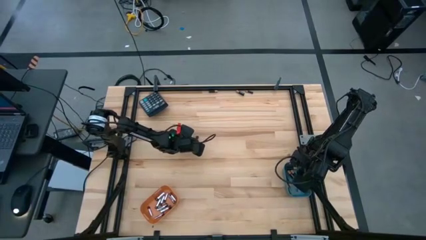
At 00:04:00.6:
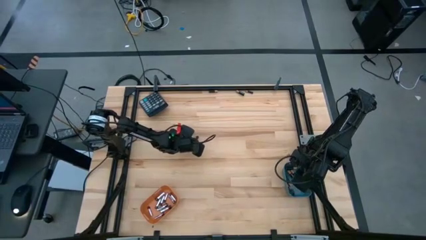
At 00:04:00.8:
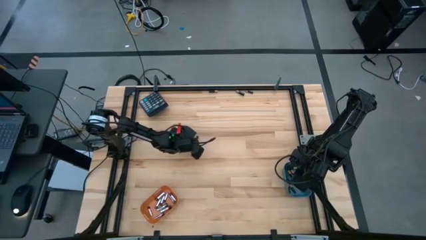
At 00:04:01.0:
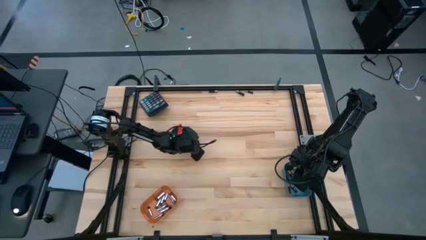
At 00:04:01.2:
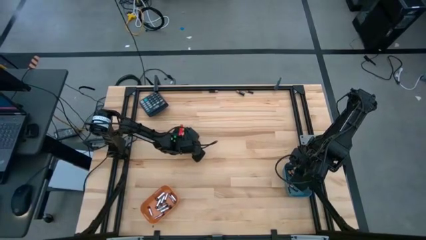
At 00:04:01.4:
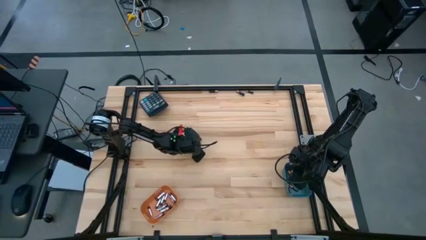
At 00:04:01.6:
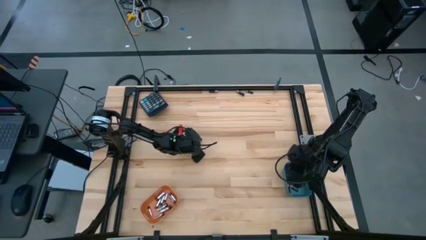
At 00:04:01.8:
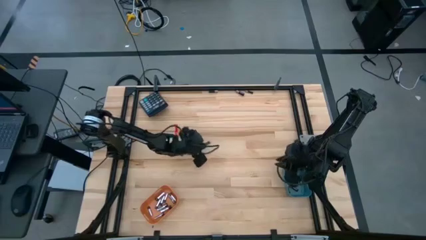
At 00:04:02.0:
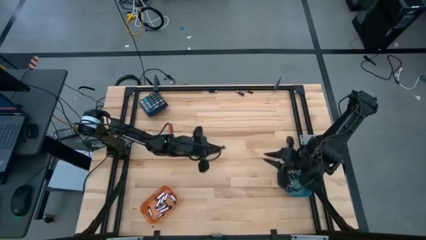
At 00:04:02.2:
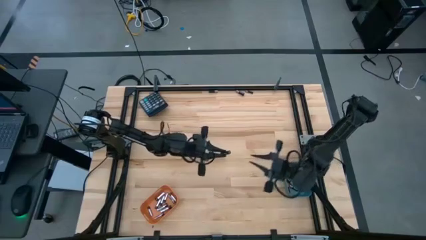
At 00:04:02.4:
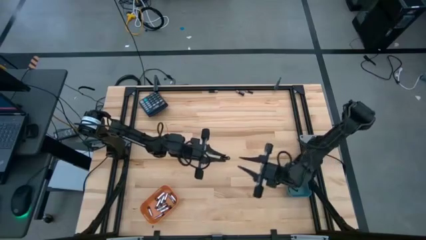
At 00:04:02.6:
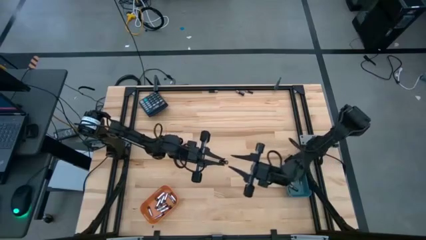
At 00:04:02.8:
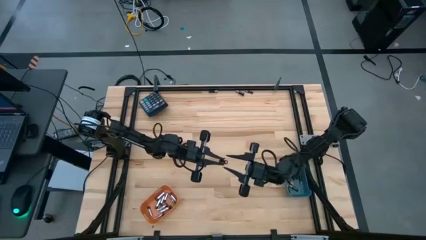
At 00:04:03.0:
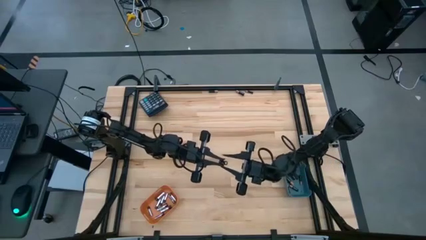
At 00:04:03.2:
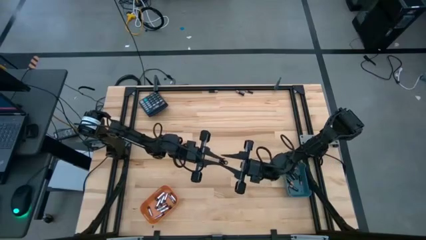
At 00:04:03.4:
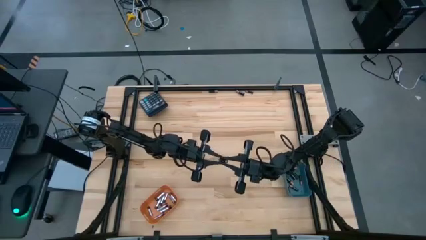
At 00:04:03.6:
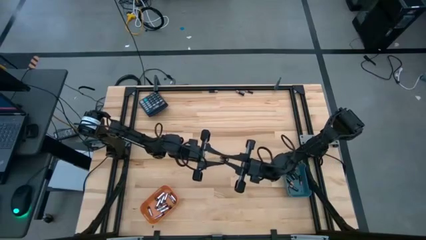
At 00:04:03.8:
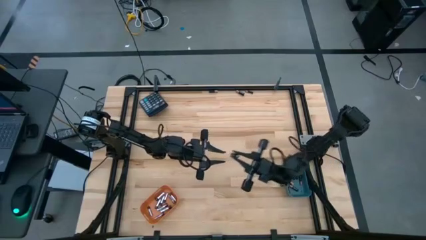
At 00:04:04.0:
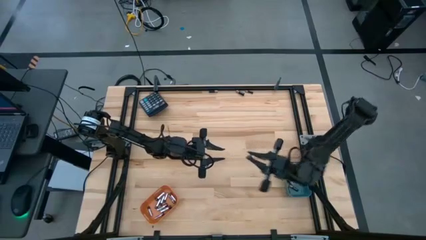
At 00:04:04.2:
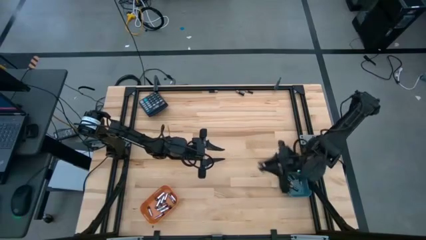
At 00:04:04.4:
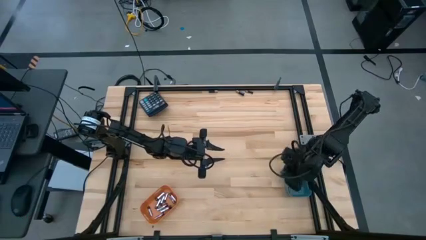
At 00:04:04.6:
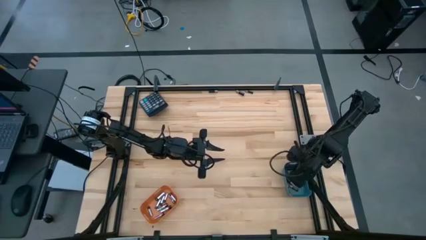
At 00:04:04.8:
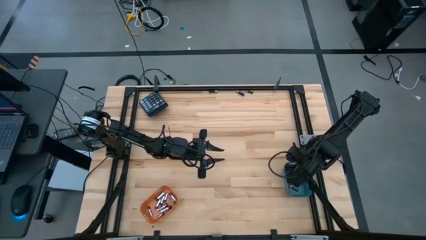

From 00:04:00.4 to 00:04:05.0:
Task: Sort batteries
Put the black battery into the blue bin

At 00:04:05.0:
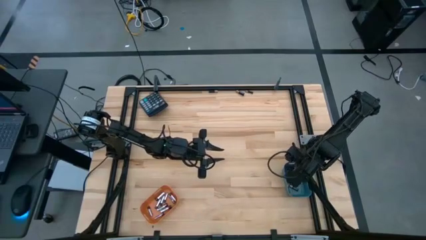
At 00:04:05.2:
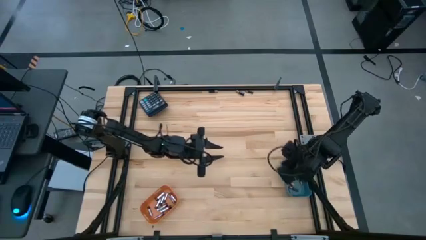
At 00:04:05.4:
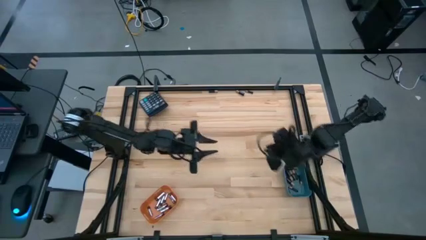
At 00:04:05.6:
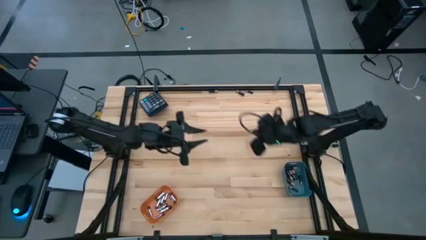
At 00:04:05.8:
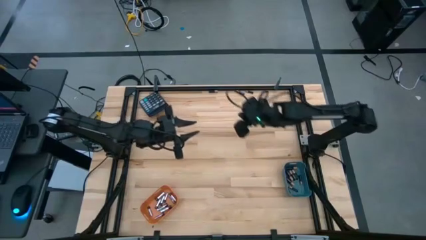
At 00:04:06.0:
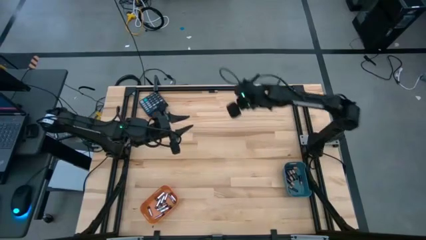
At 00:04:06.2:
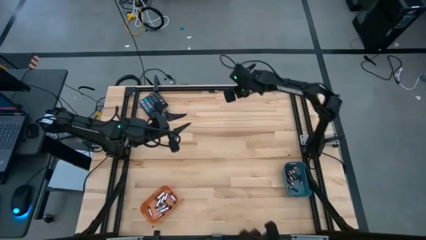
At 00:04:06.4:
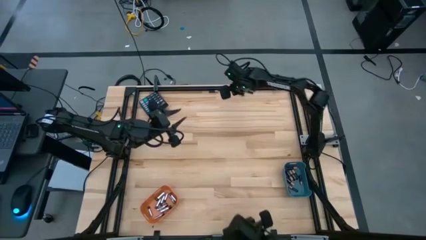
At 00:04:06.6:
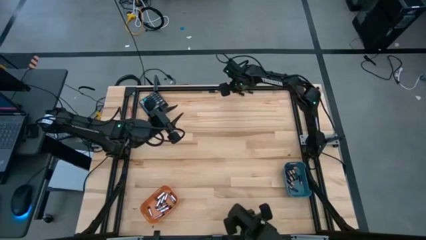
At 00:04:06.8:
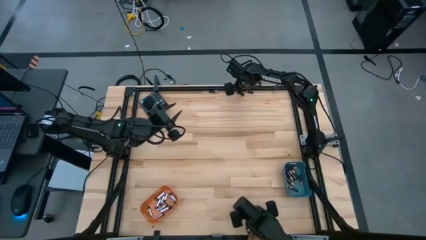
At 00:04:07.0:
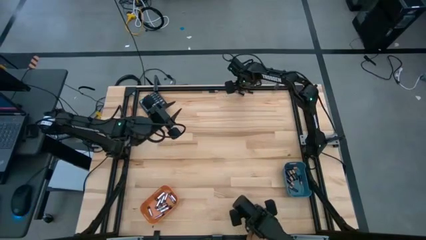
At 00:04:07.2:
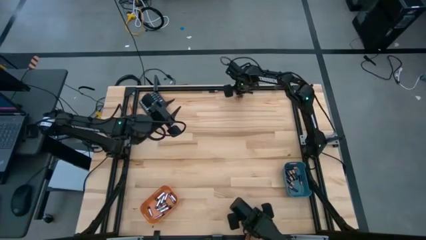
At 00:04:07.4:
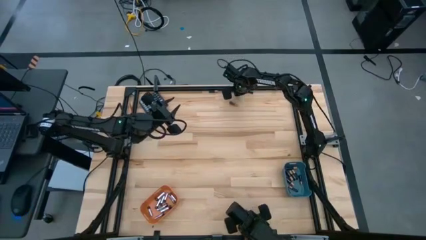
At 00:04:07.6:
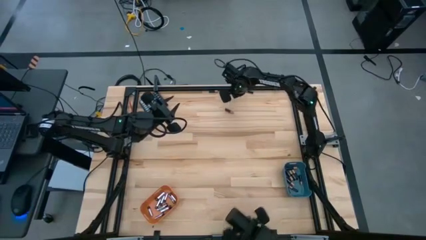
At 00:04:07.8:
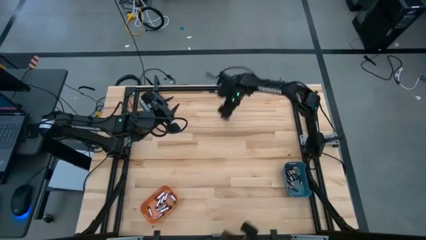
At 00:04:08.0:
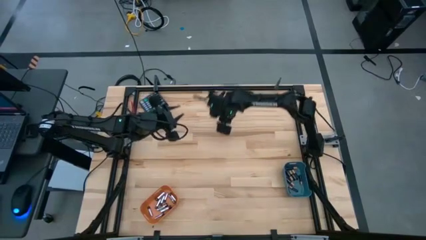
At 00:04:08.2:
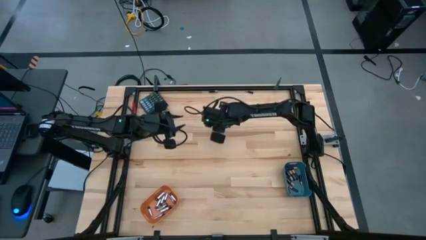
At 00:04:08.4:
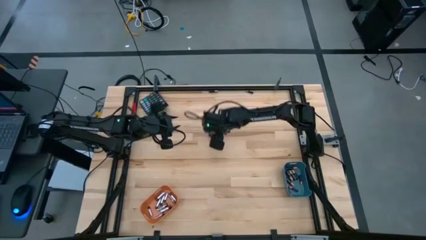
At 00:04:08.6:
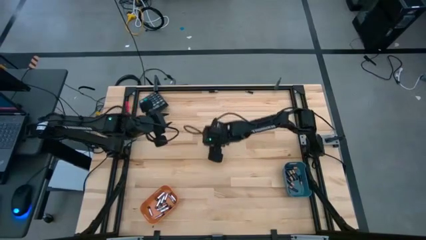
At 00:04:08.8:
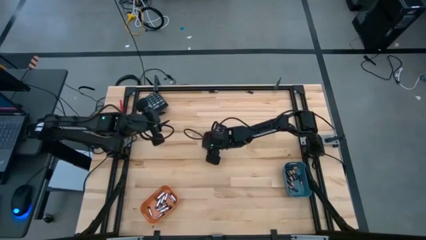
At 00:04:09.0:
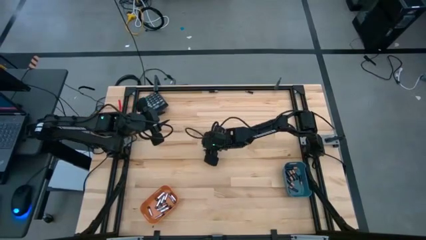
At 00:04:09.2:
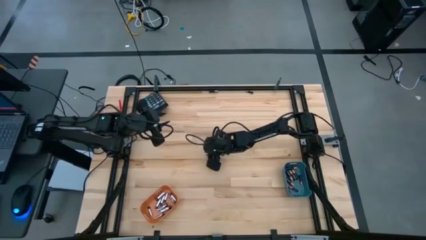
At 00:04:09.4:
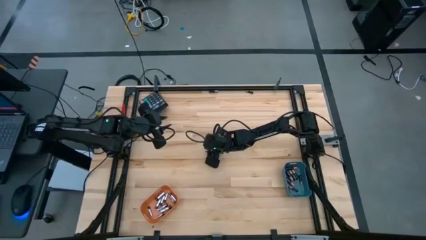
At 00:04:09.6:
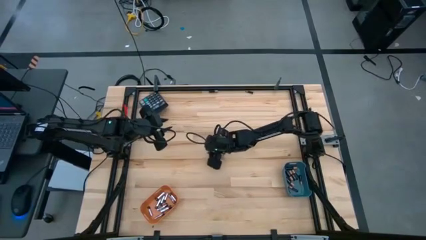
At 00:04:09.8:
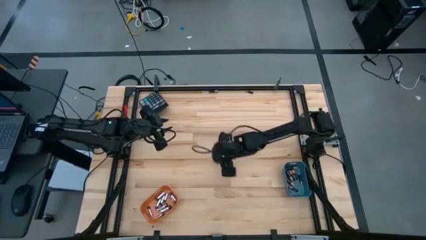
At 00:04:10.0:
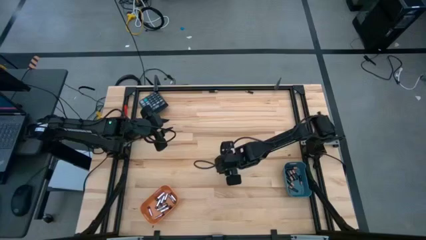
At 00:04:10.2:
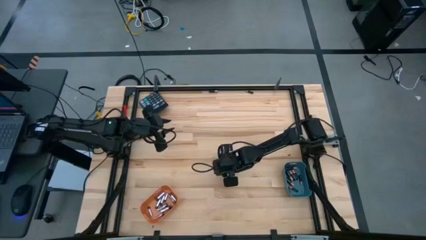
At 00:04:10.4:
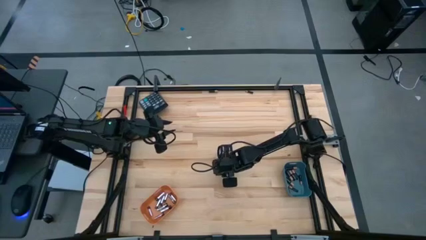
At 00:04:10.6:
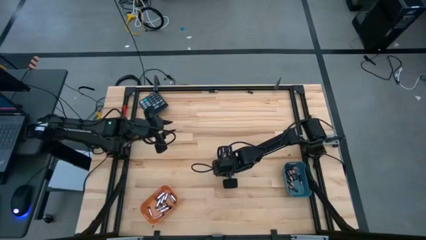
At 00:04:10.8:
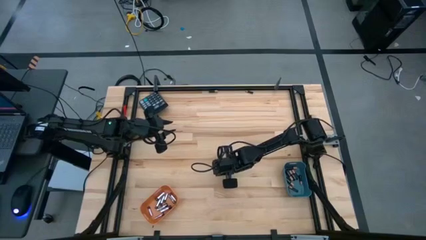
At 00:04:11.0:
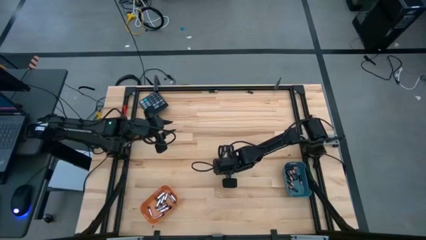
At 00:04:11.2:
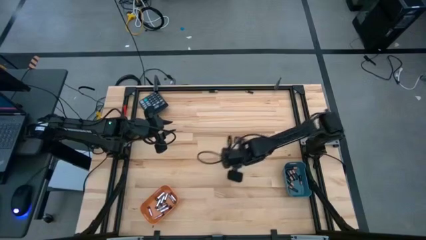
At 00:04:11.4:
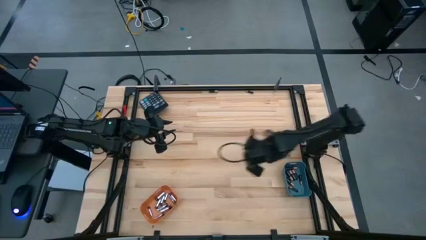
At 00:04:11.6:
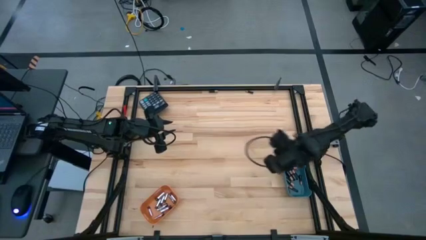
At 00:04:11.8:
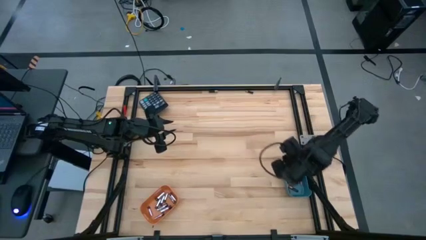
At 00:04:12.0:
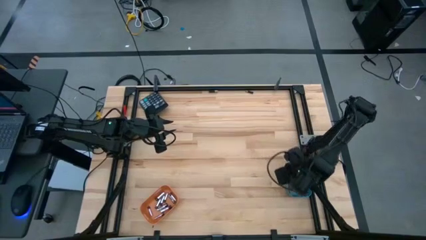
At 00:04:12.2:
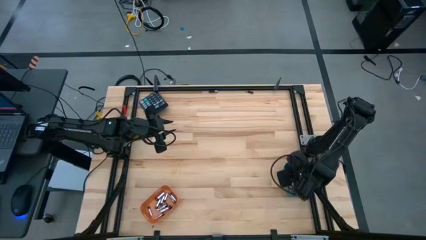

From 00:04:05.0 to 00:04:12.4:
Put the black battery into the blue bin

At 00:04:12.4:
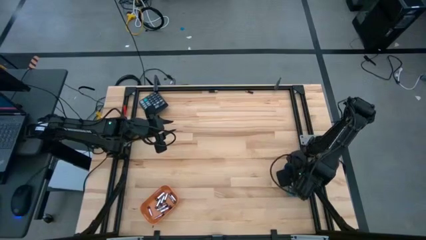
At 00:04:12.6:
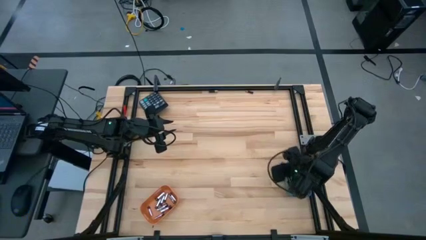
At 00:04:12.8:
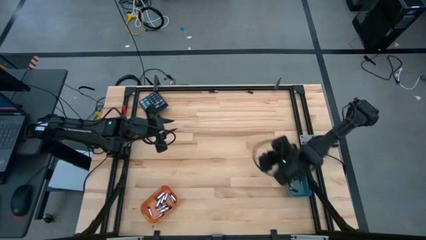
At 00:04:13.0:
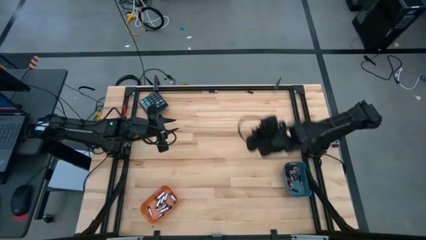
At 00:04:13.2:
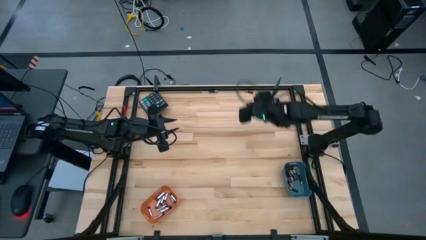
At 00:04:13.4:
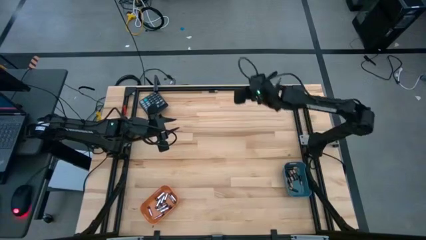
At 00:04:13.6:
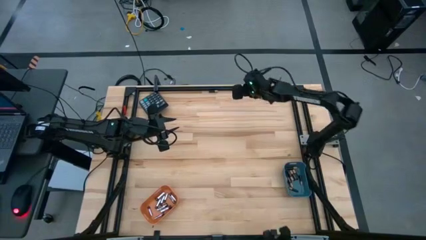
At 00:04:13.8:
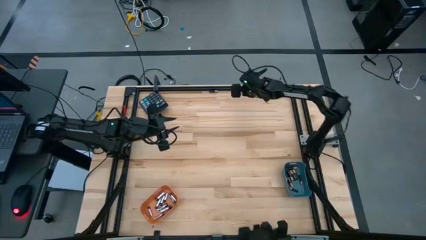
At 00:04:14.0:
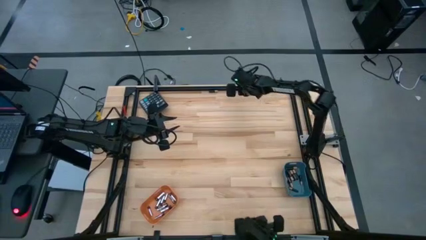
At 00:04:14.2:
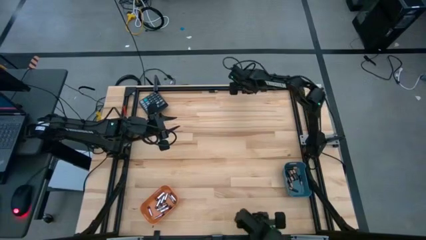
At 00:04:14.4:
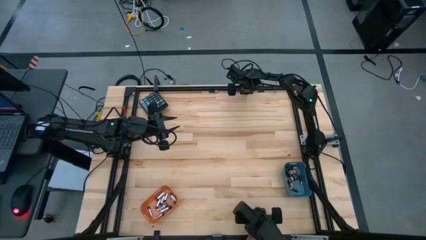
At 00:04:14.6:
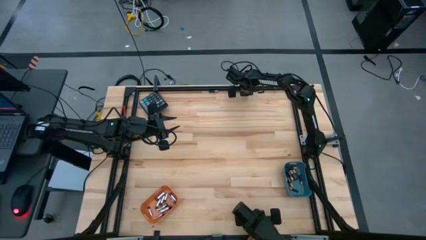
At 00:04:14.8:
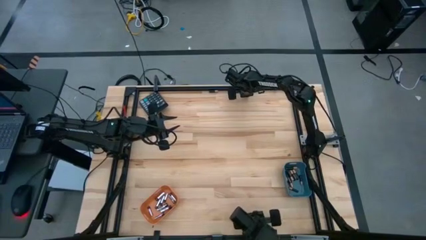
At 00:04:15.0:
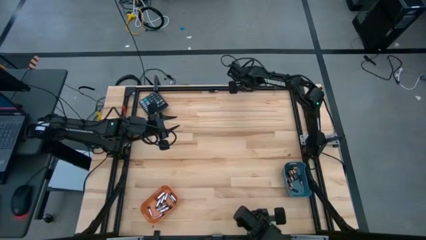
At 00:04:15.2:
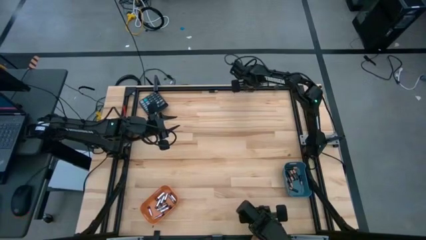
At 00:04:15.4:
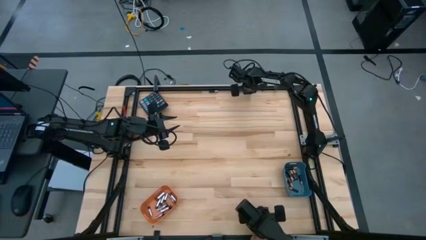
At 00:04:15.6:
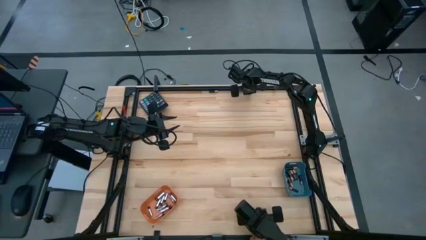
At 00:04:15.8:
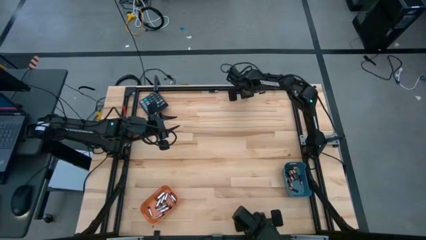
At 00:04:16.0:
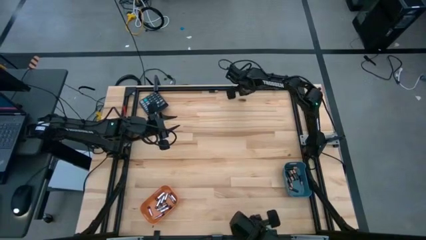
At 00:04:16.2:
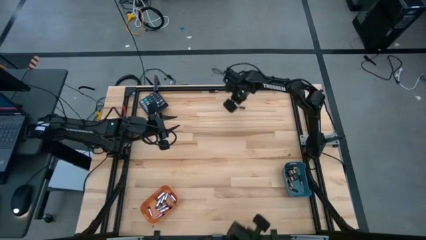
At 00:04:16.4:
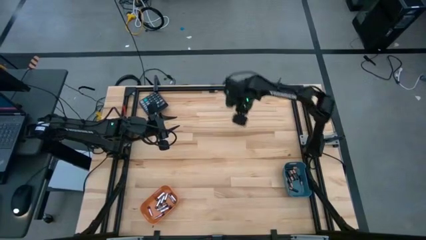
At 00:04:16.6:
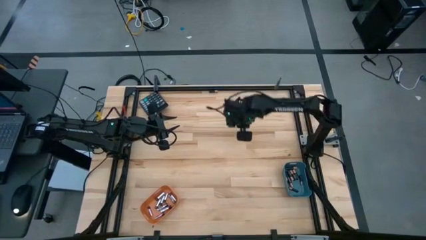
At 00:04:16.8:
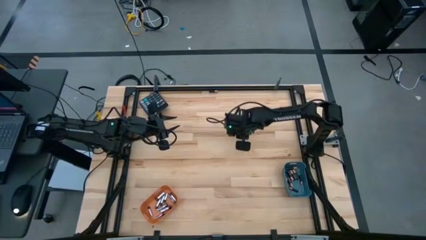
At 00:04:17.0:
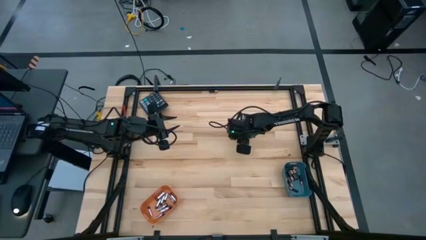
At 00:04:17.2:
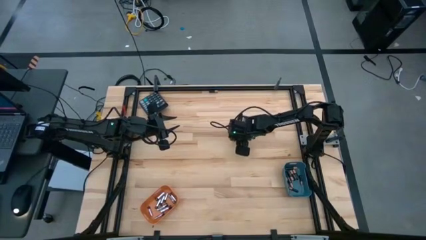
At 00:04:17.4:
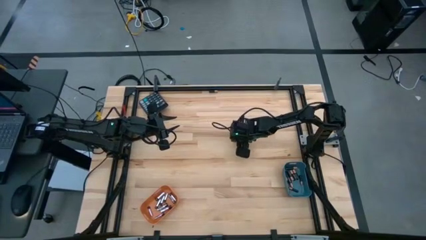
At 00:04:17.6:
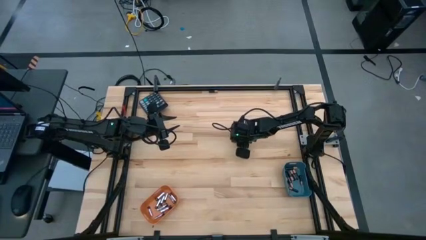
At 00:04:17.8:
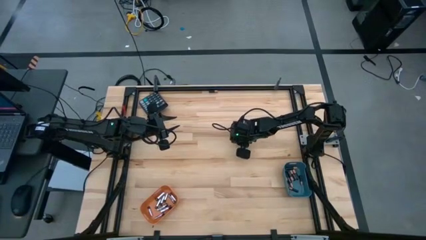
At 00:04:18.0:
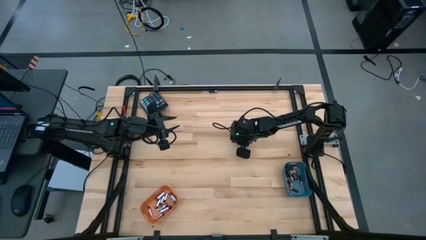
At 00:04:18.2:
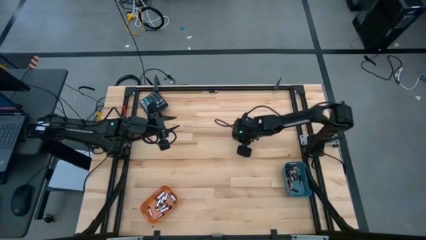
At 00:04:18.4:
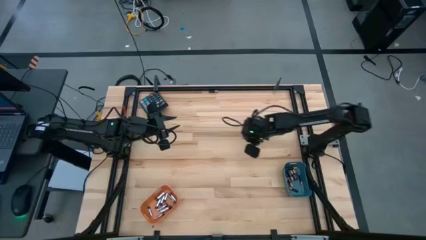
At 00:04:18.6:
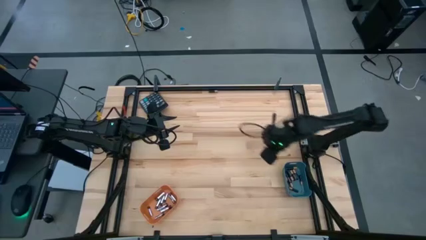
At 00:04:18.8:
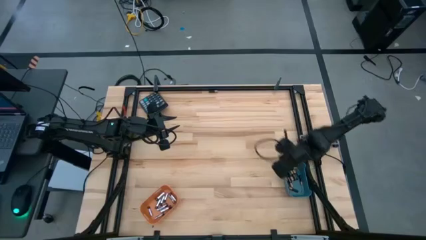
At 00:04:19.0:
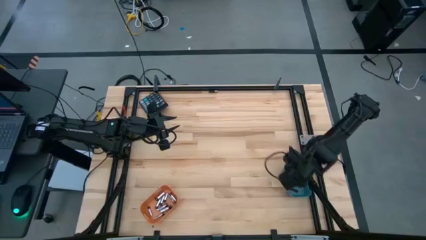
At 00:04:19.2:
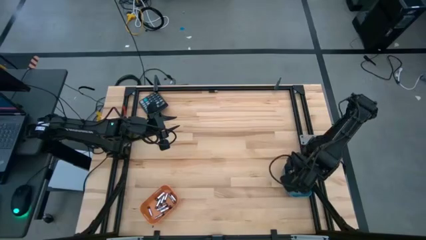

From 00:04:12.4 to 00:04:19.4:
Put the black battery into the blue bin
